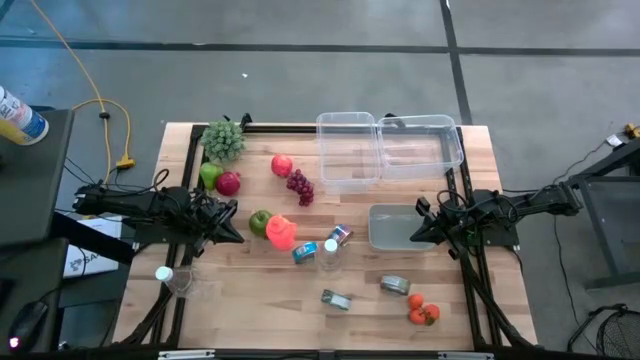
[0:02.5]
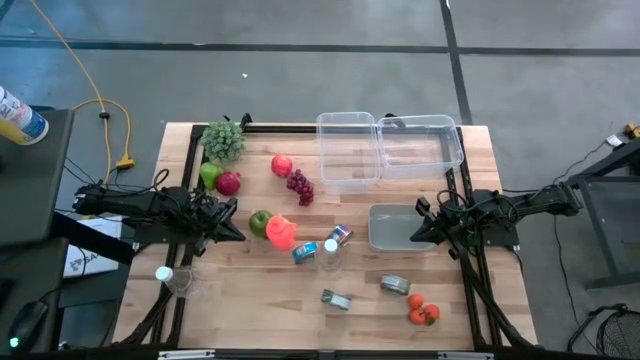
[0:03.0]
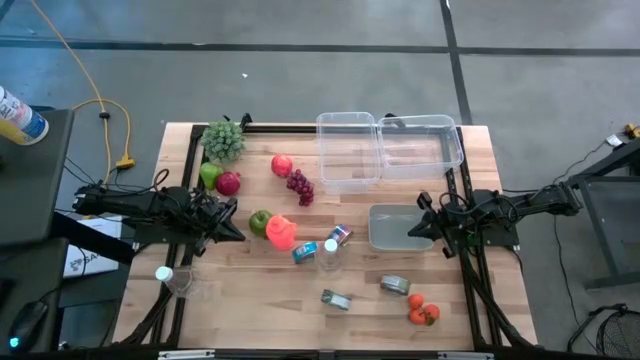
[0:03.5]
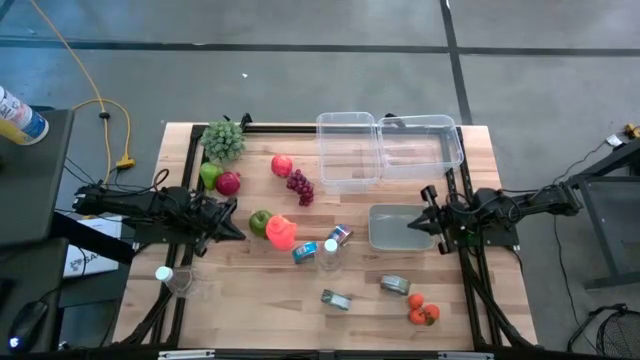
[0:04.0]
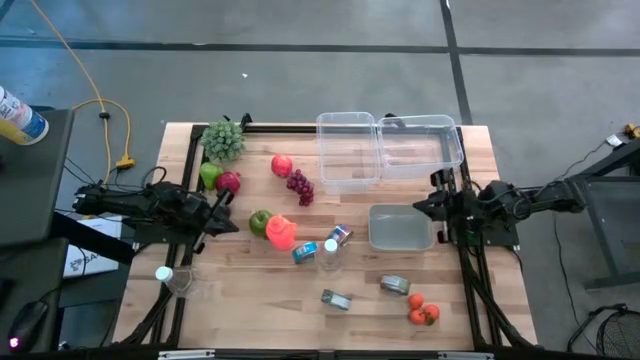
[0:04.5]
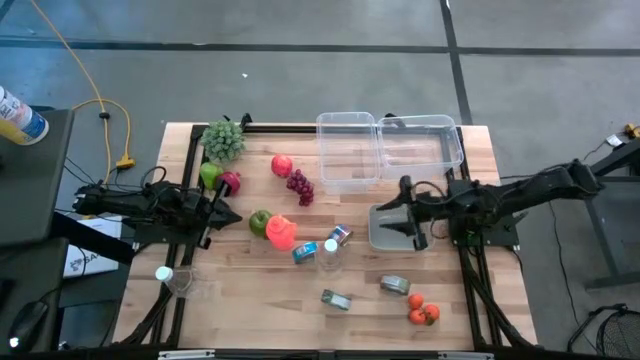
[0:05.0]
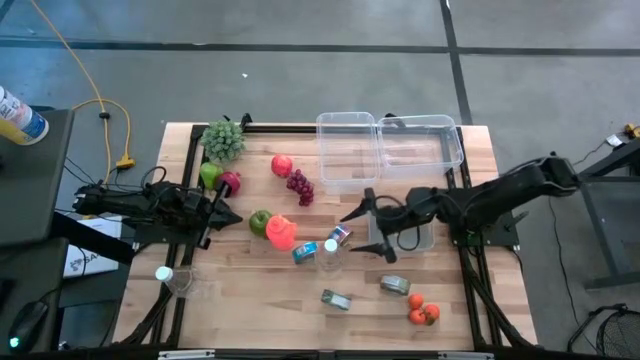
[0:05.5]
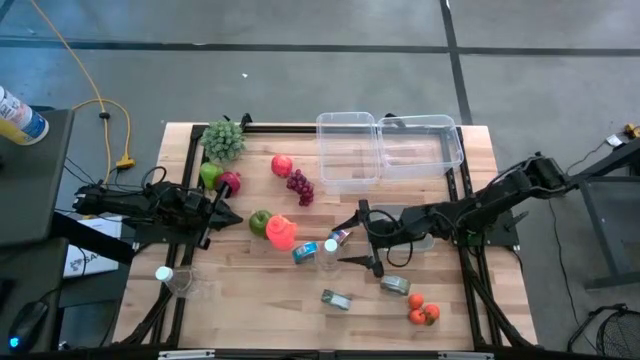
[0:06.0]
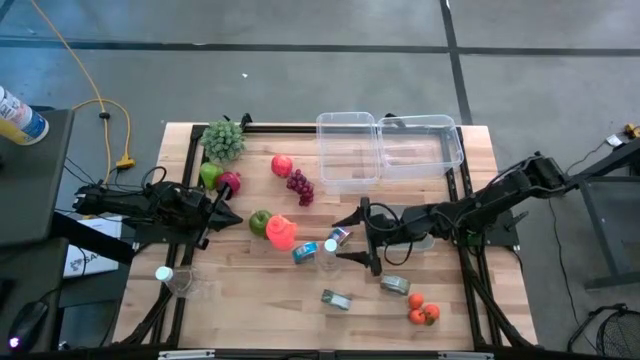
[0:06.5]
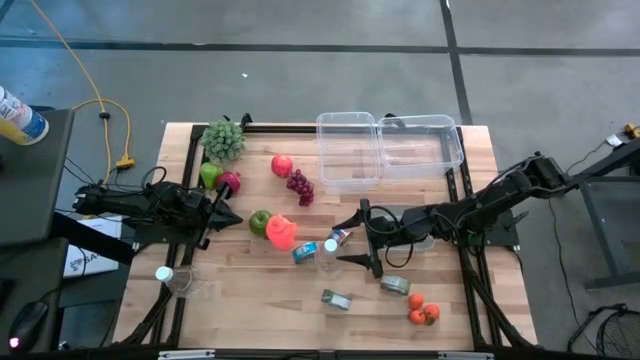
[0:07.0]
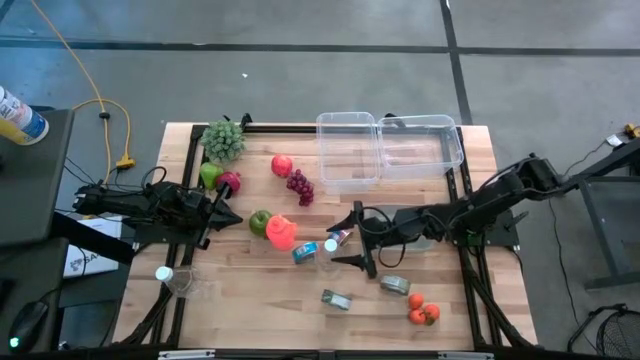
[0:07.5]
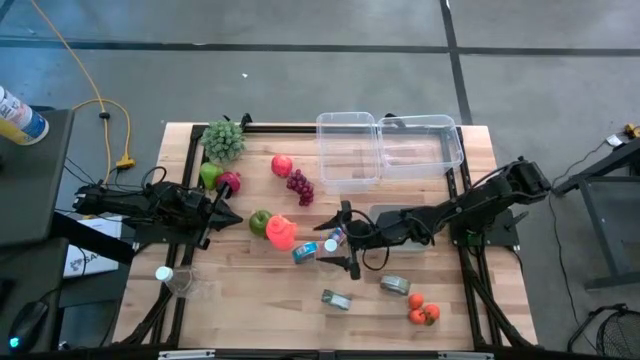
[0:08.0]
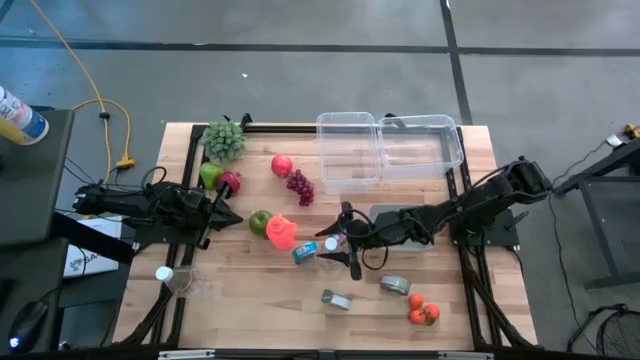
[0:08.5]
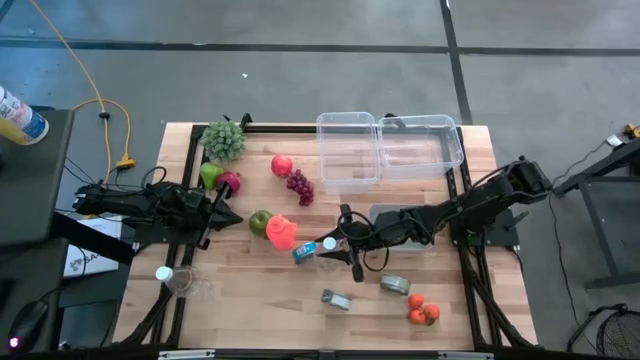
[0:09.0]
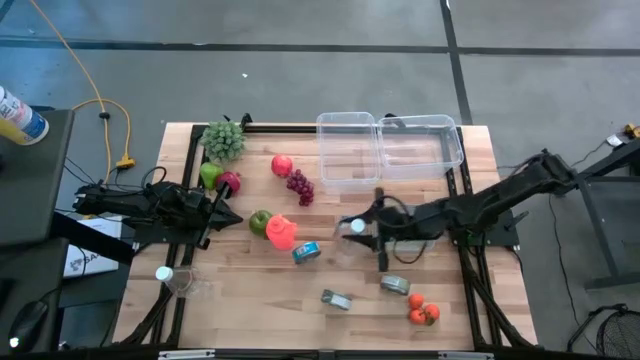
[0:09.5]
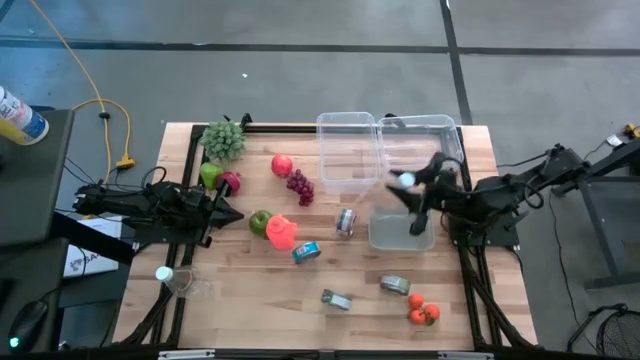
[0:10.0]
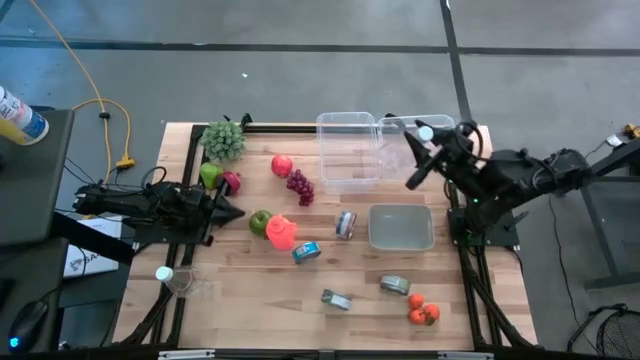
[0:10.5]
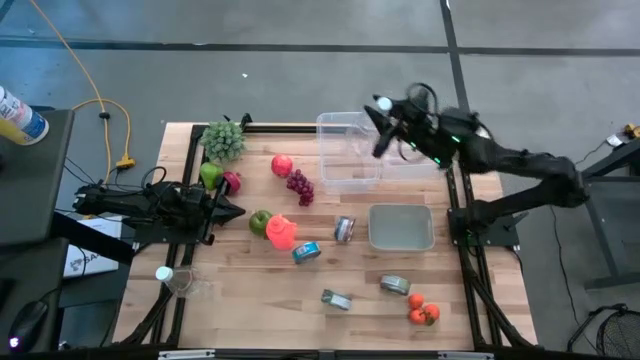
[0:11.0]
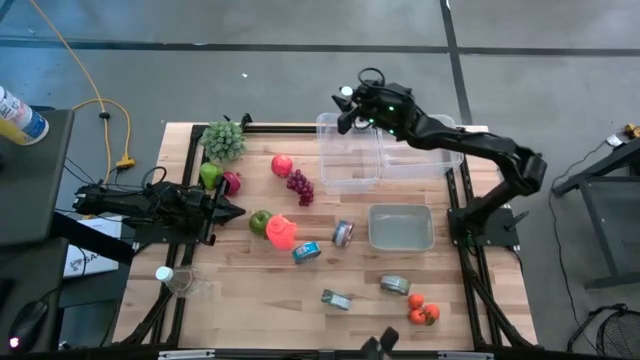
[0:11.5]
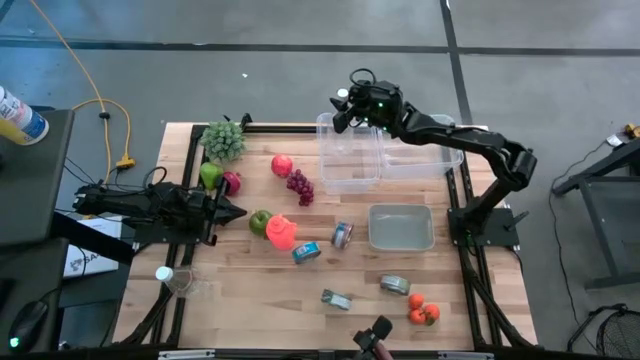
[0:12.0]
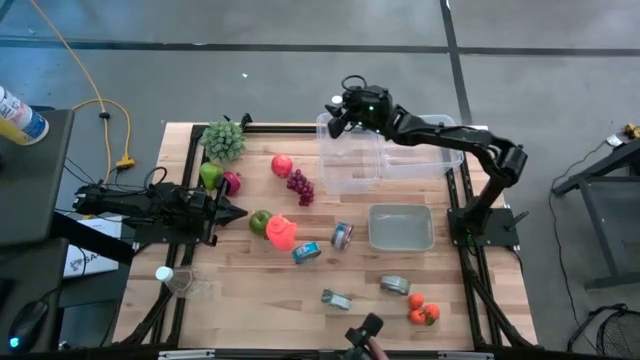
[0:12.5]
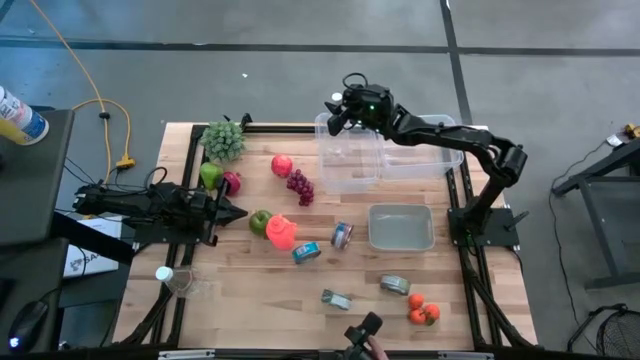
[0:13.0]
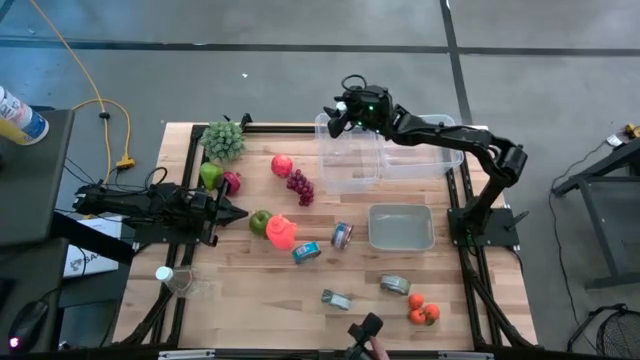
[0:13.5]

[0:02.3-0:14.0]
Task: Pick & Place Food Item
Put the right transparent water bottle into the left transparent bin

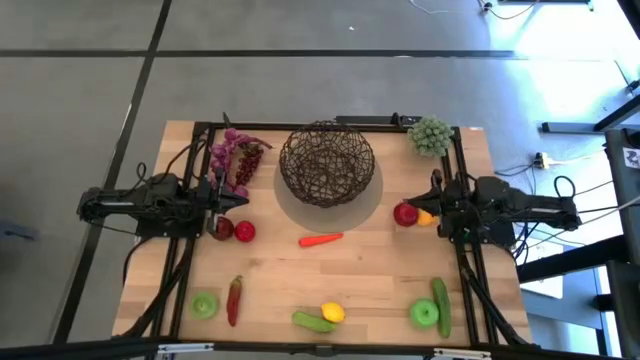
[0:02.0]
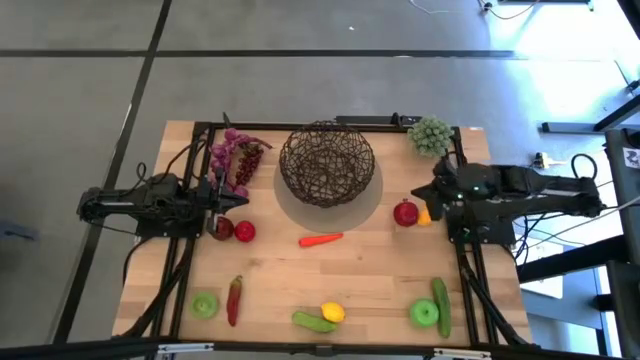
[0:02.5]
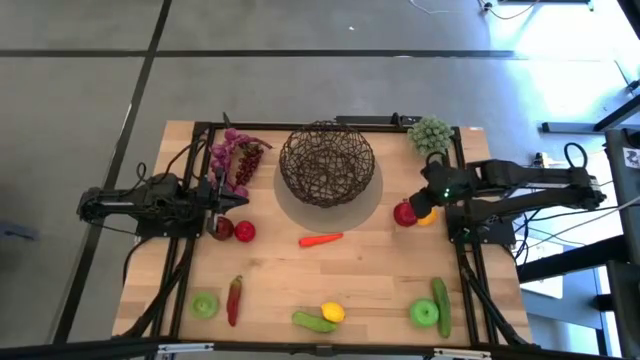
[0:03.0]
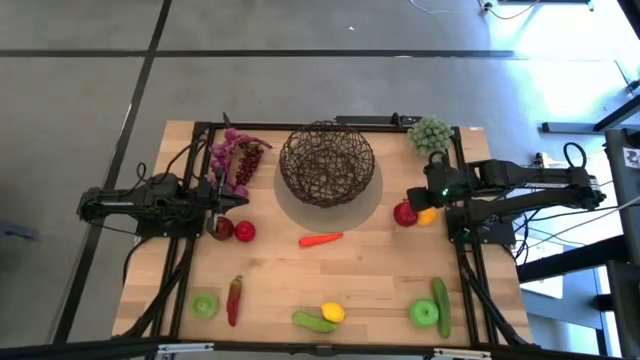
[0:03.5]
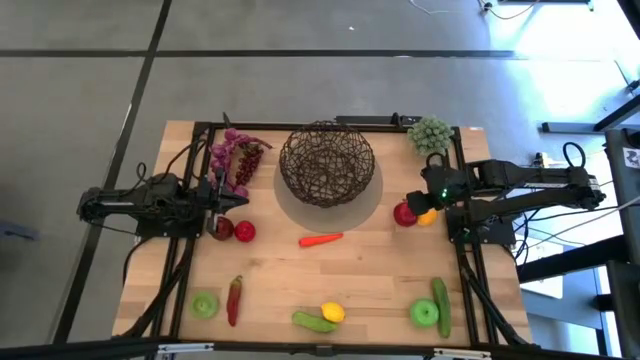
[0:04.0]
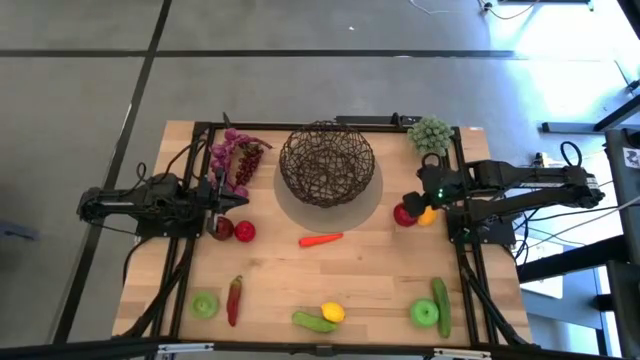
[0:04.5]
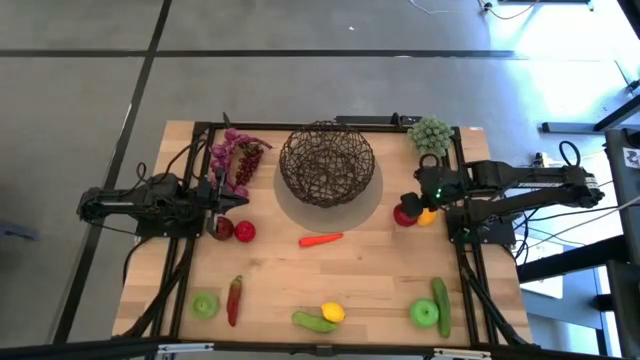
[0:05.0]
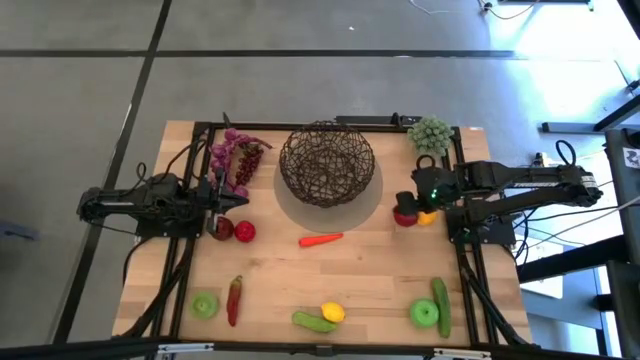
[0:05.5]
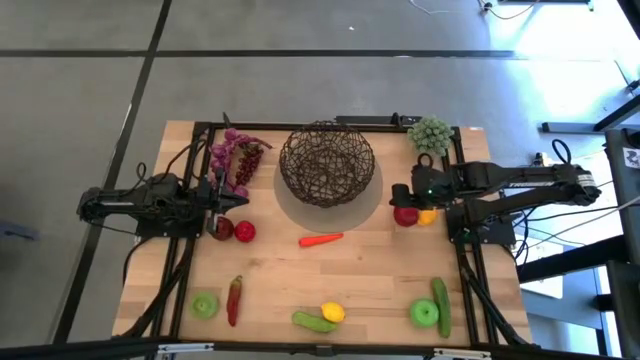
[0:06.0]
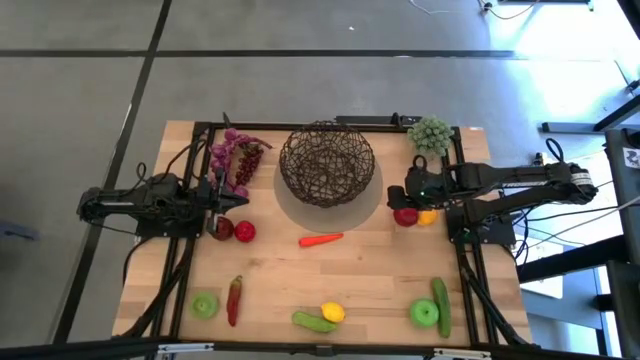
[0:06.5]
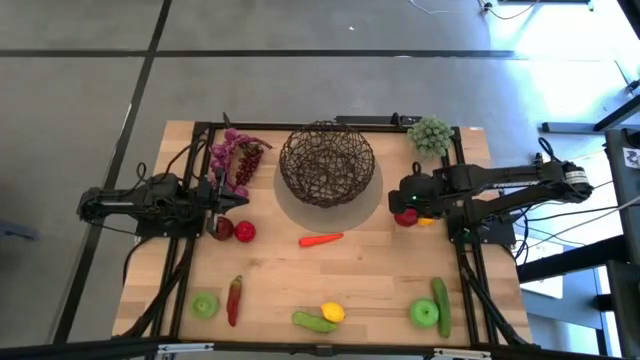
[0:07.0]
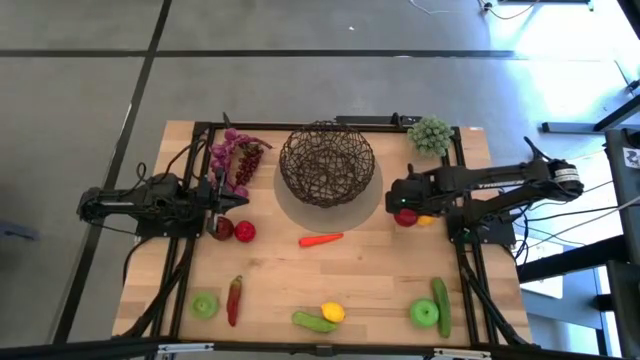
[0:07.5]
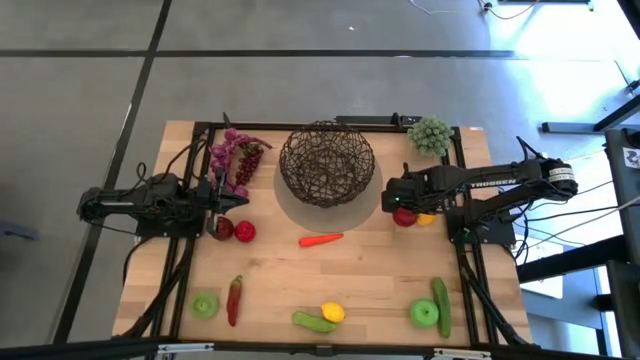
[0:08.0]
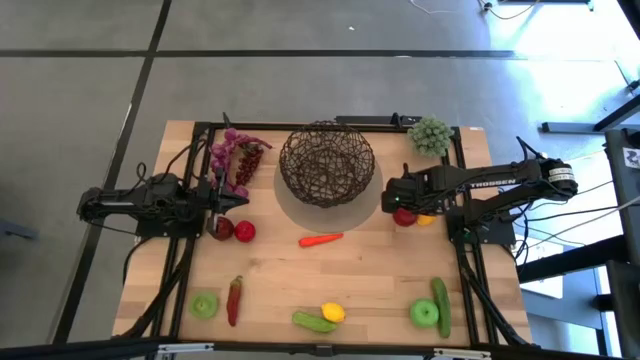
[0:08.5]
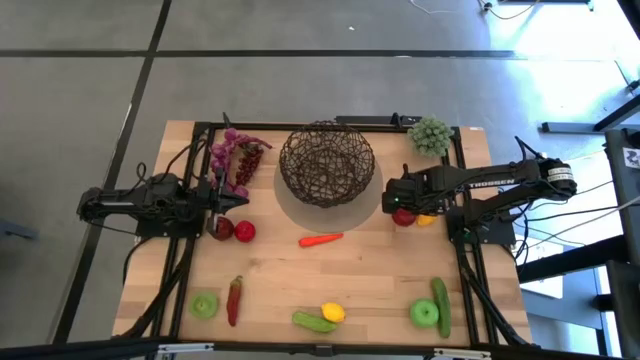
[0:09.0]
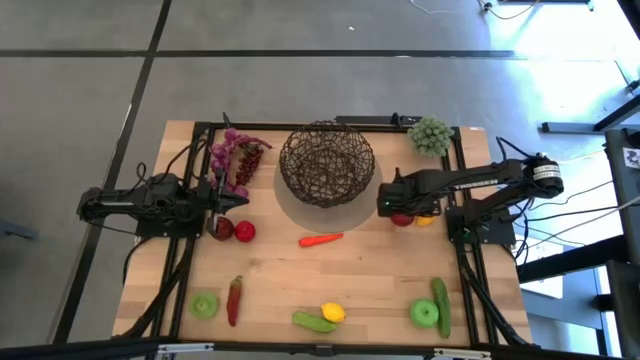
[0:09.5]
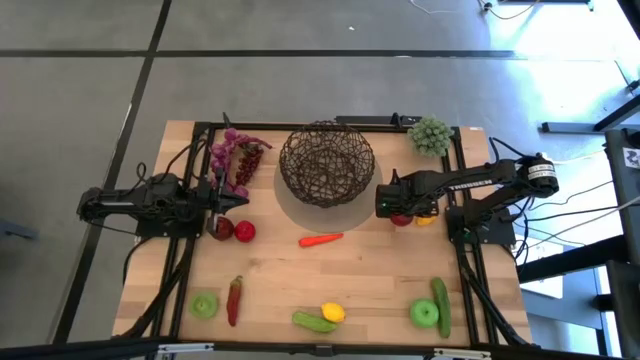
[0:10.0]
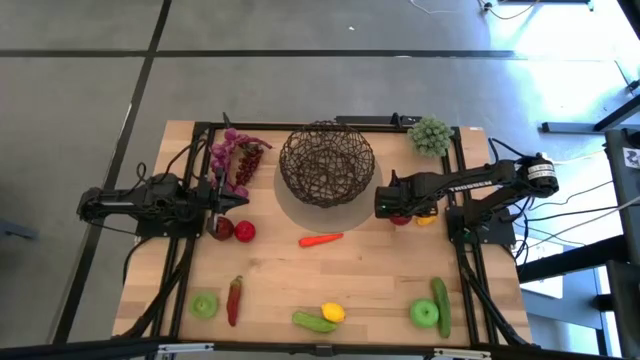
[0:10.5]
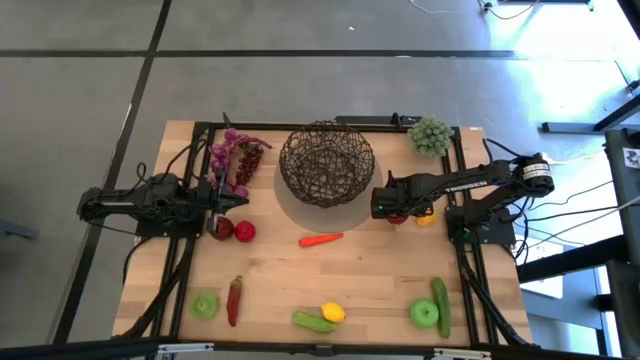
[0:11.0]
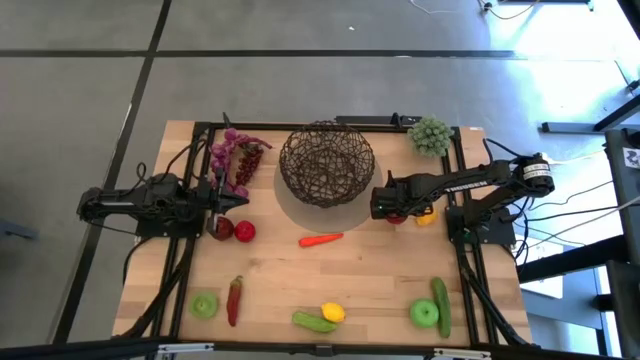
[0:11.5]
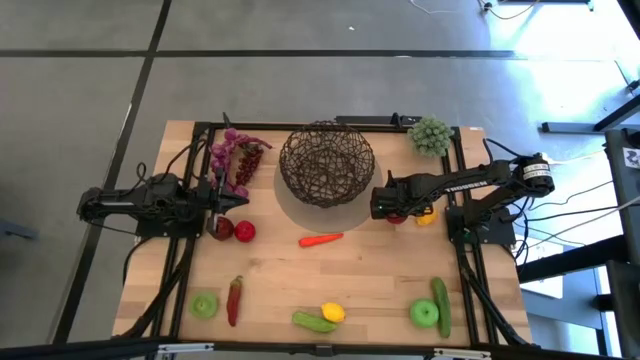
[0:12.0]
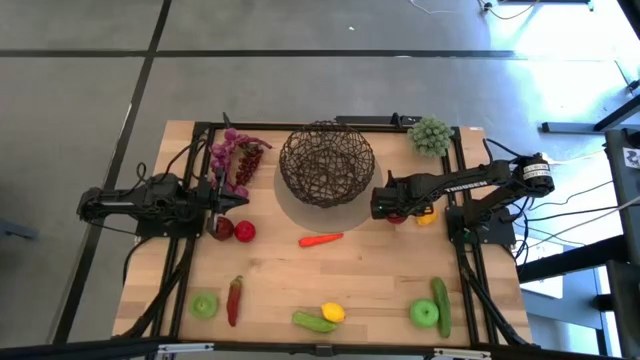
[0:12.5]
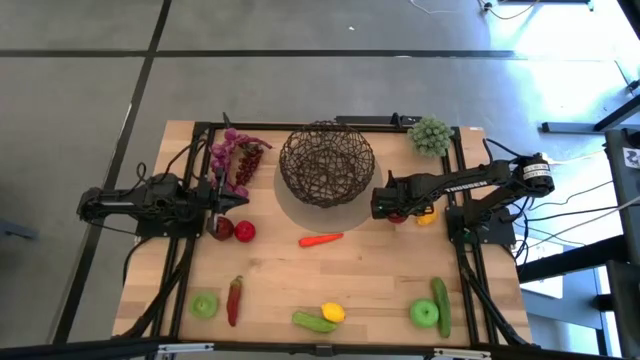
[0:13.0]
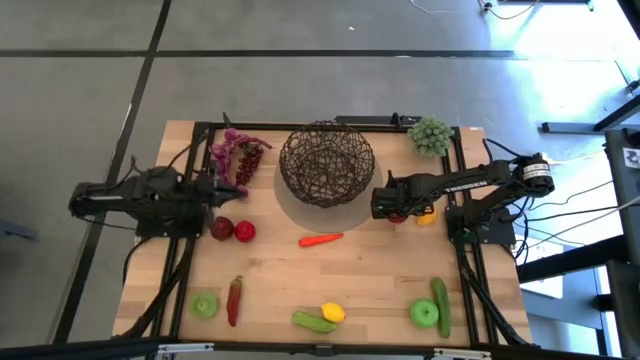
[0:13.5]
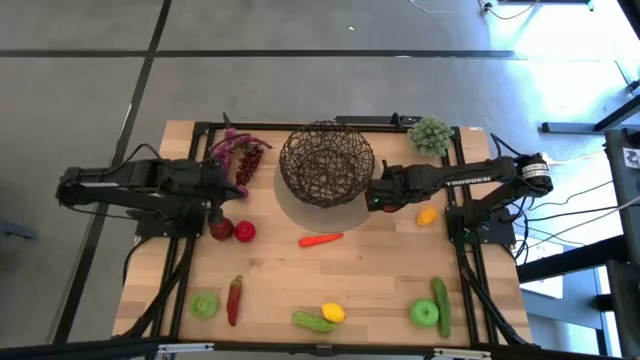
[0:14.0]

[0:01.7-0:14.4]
Task: Build produce basket
Put the pomegranate into the wire basket
